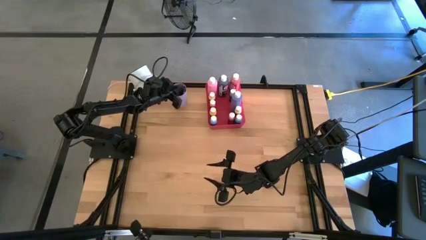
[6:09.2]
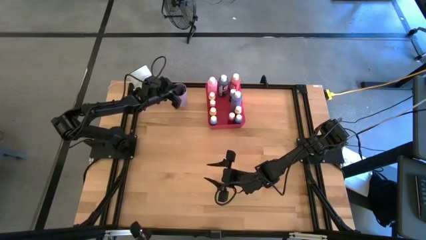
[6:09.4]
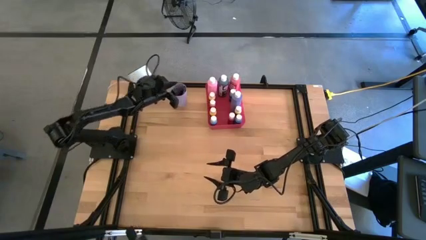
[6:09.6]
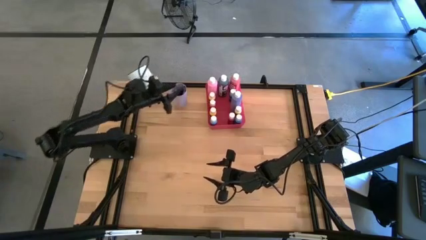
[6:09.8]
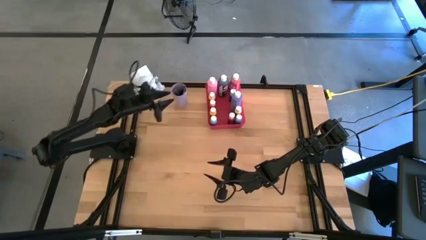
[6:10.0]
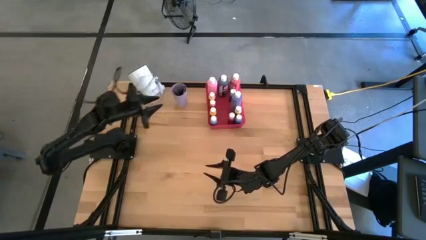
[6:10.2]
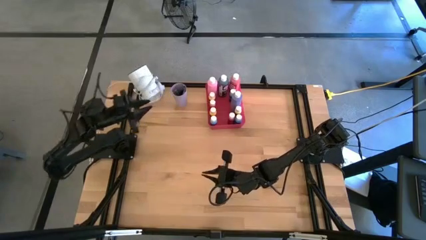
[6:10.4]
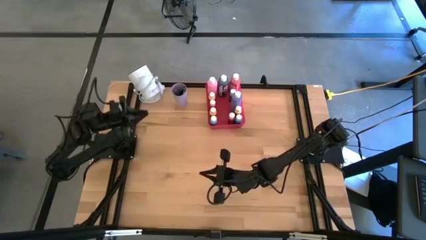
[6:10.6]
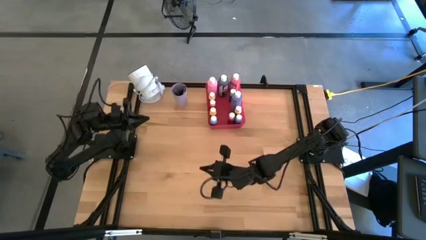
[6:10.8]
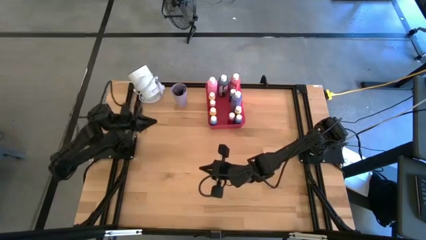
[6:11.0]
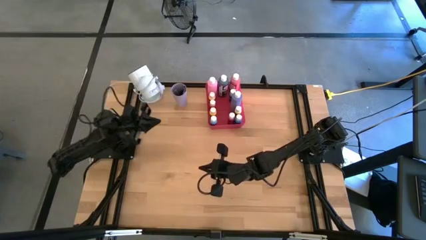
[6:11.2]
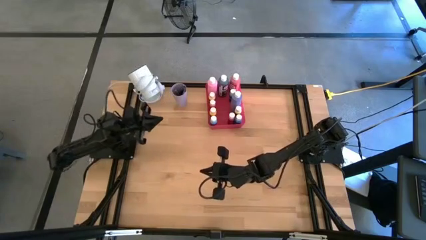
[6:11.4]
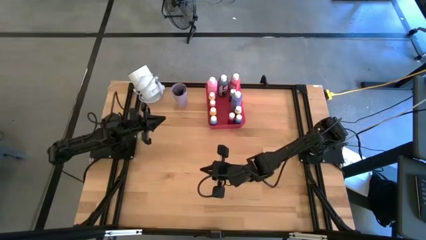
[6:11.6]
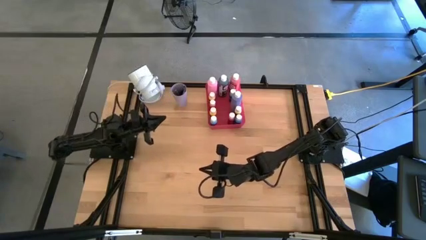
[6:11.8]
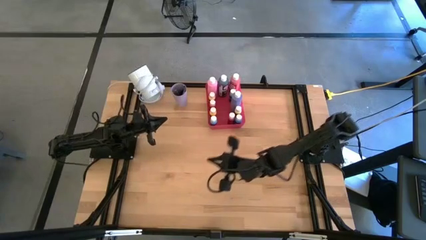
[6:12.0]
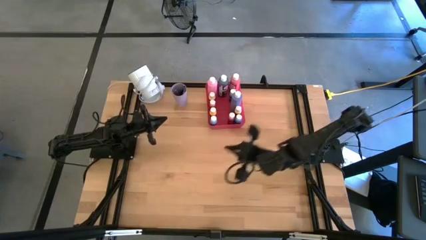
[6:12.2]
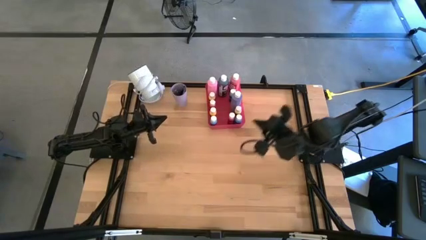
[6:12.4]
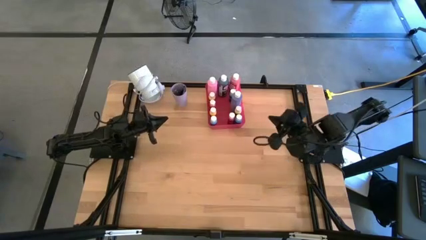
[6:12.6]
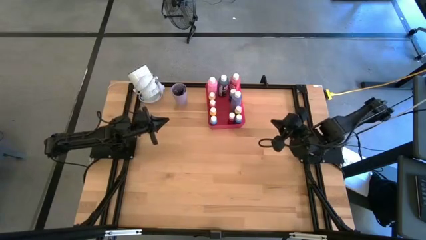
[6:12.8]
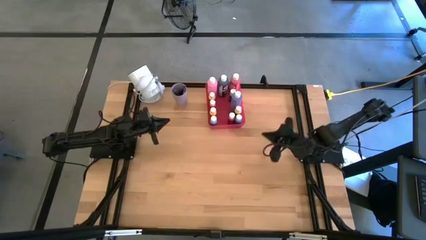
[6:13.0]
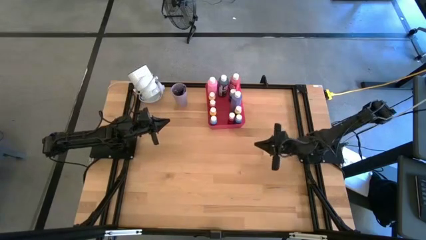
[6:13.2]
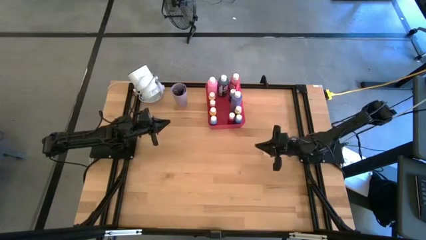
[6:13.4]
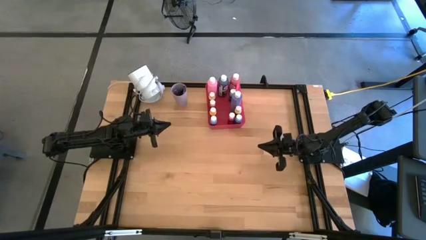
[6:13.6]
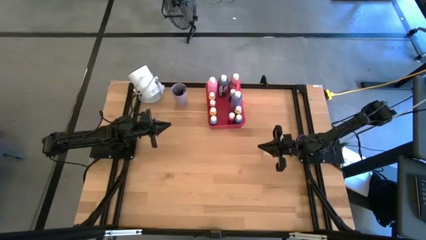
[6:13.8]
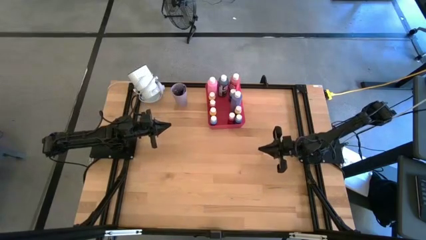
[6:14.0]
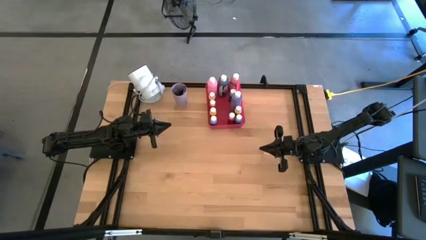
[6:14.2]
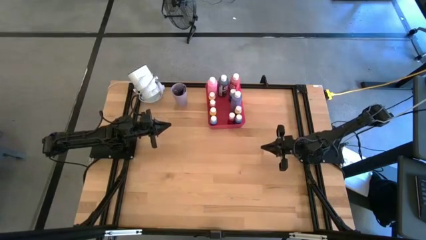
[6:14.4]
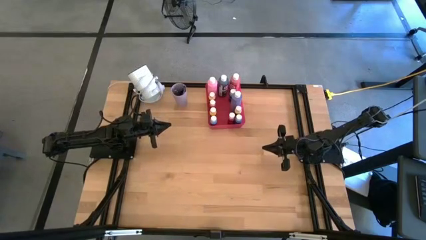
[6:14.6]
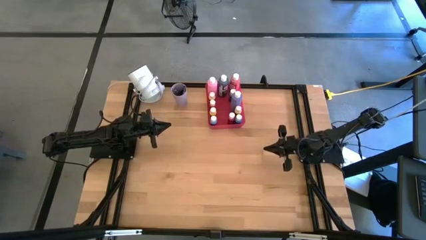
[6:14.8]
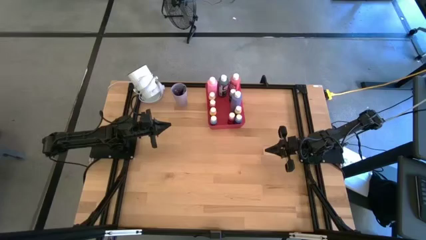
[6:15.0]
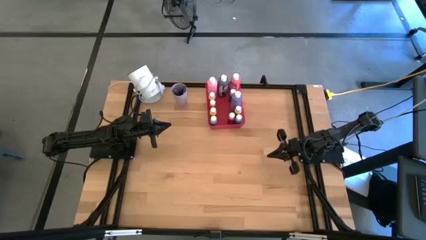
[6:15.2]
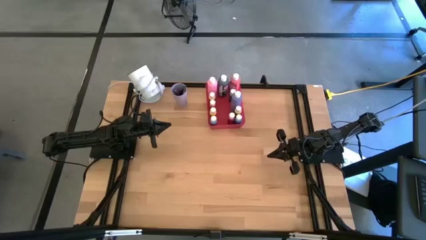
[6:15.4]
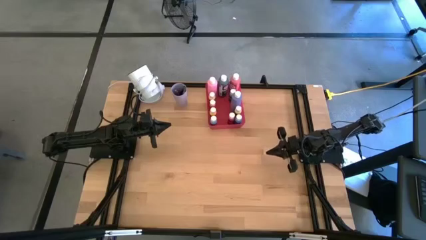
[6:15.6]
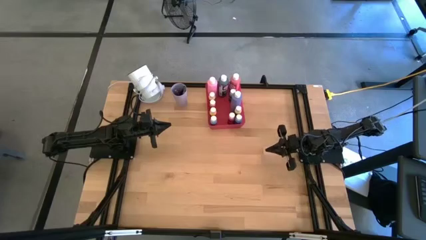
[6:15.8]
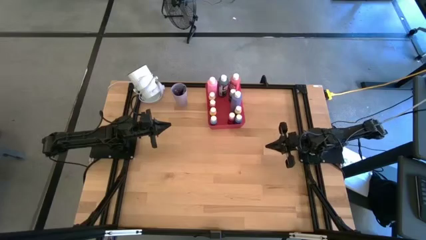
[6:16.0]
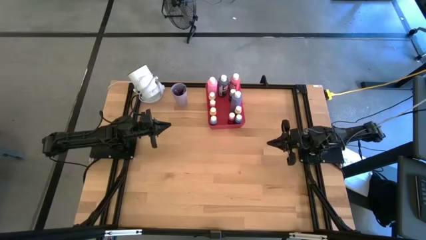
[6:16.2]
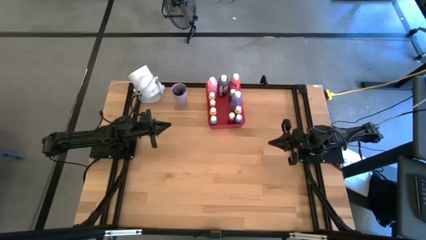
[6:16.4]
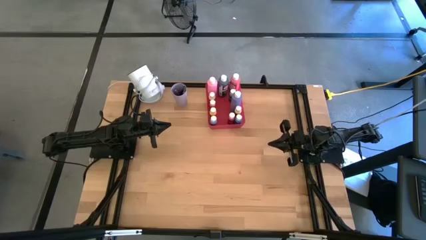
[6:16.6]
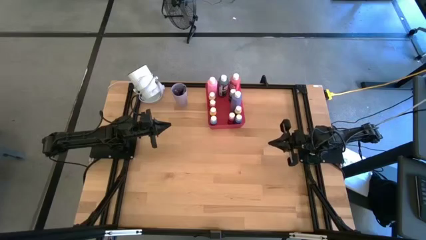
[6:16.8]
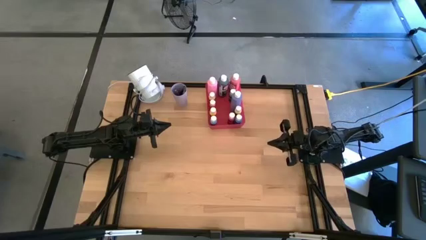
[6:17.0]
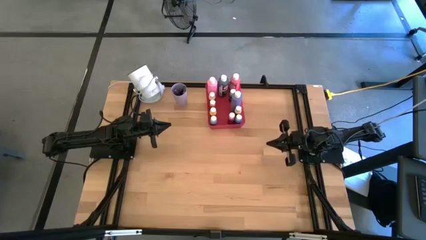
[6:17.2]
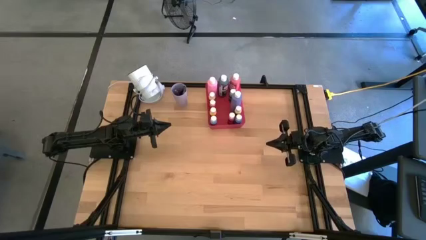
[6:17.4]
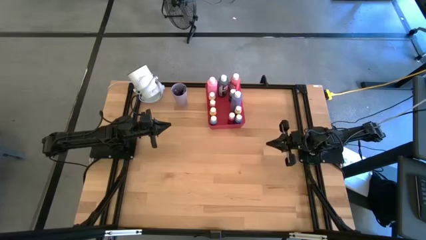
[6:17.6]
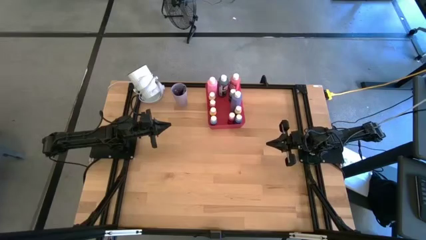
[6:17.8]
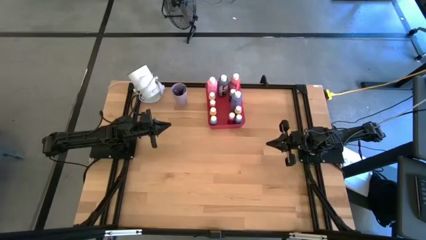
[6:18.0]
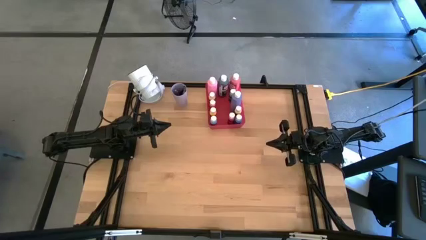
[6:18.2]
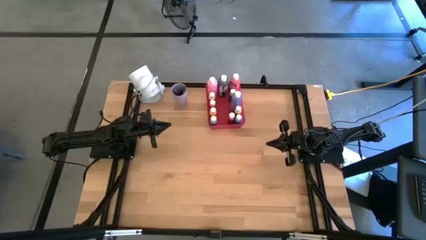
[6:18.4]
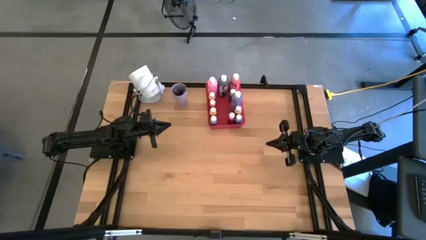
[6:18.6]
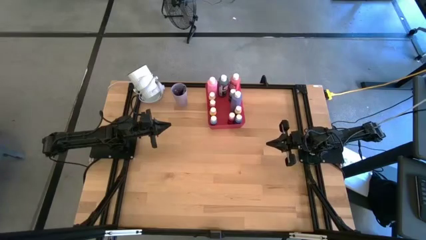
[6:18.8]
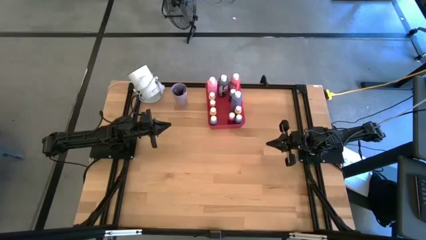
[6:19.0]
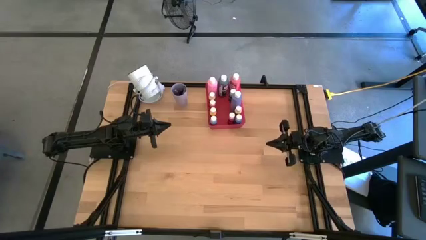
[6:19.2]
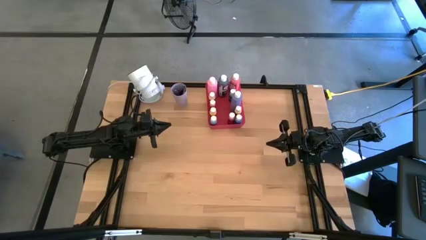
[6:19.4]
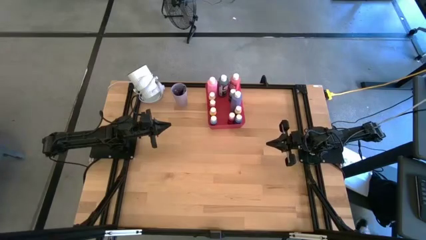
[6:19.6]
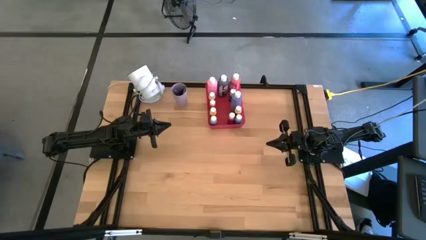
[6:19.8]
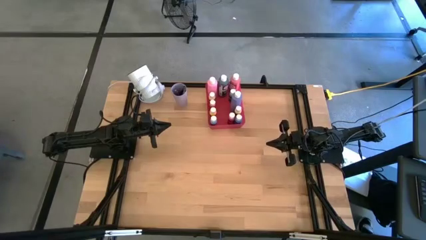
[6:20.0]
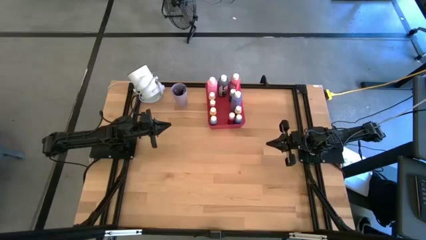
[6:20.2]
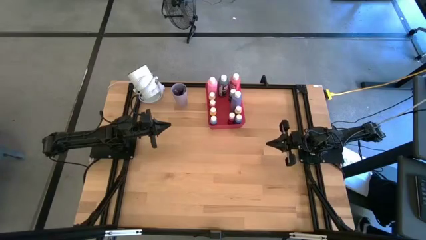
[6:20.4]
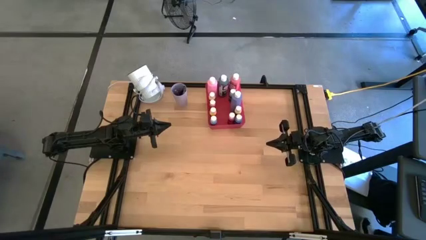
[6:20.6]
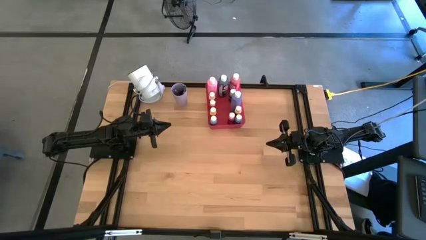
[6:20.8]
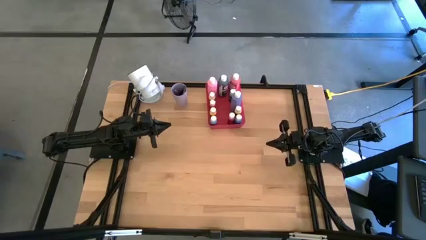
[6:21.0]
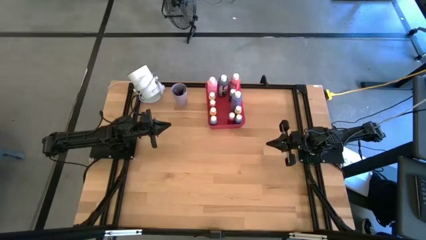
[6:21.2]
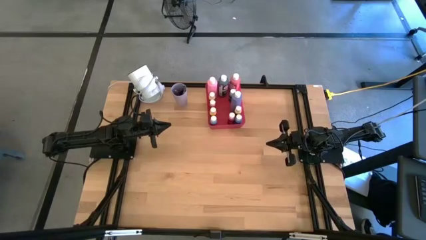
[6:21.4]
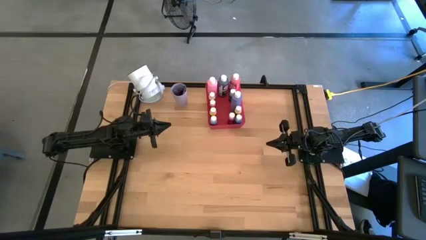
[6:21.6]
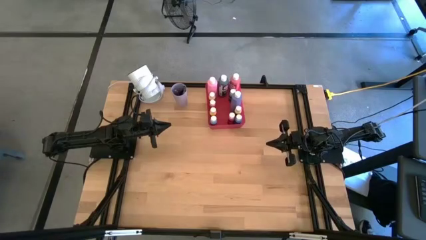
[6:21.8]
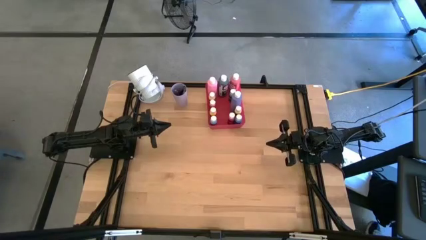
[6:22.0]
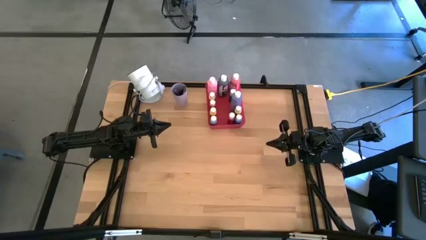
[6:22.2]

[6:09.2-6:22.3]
Task: Pick & Place Paint Supplies
Return to Home Position

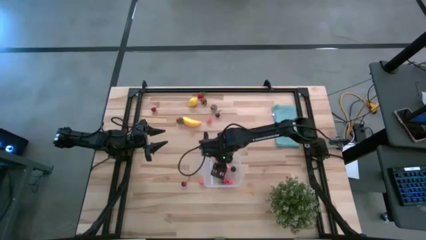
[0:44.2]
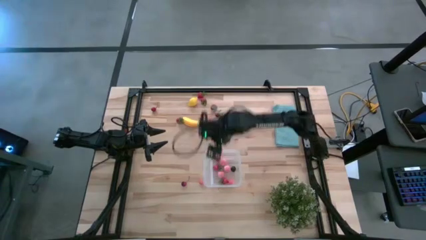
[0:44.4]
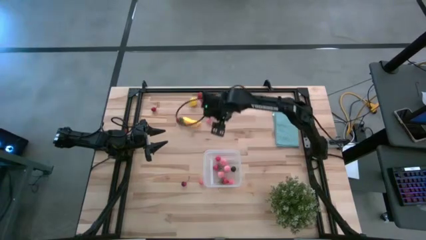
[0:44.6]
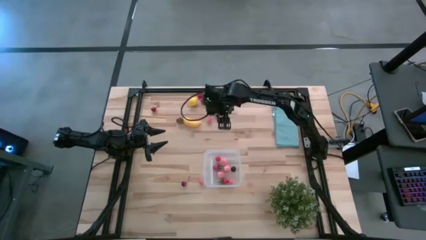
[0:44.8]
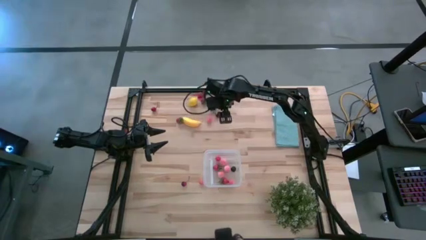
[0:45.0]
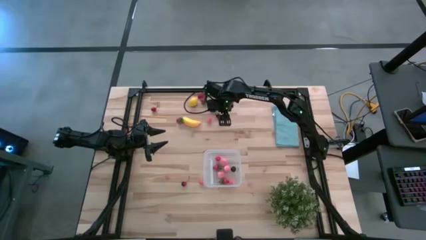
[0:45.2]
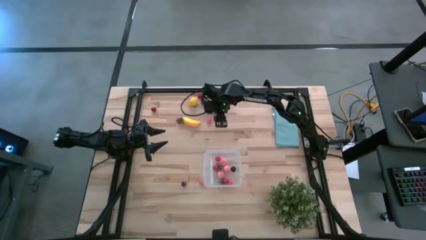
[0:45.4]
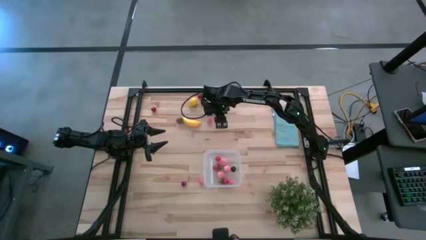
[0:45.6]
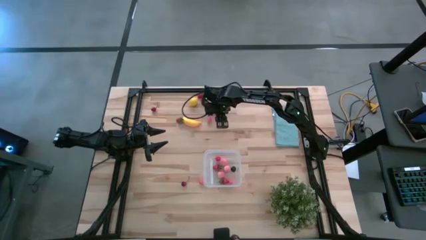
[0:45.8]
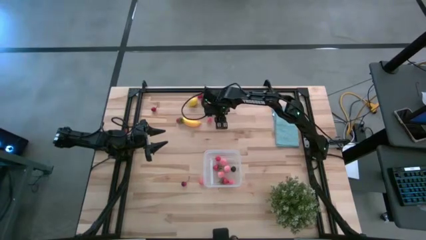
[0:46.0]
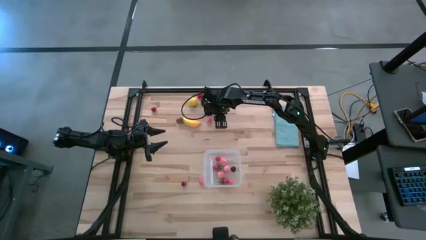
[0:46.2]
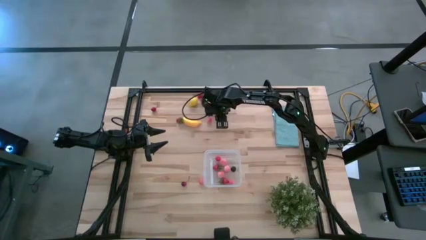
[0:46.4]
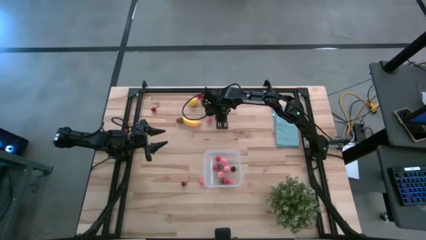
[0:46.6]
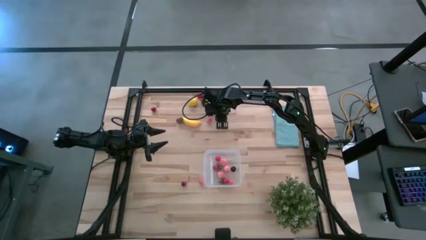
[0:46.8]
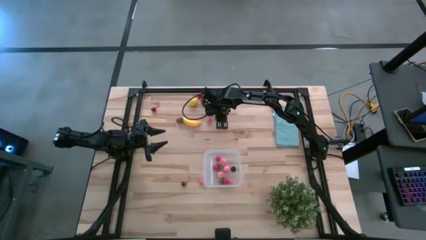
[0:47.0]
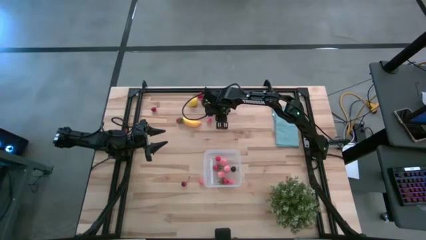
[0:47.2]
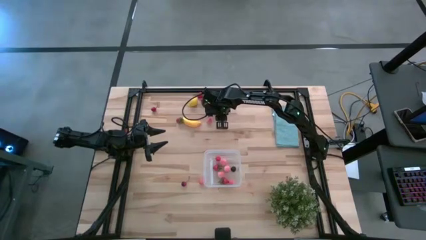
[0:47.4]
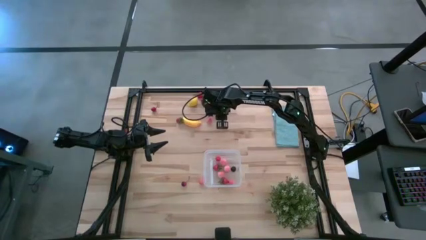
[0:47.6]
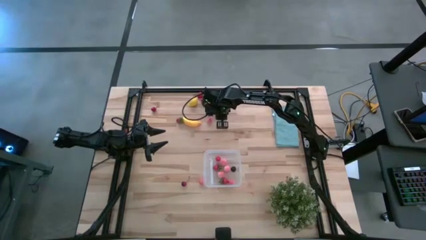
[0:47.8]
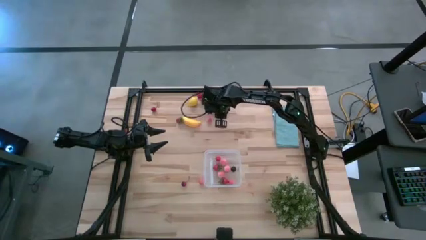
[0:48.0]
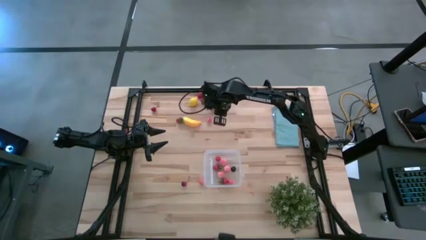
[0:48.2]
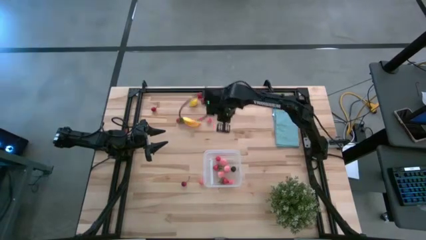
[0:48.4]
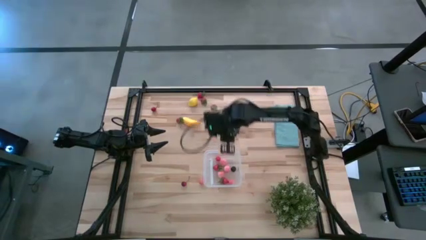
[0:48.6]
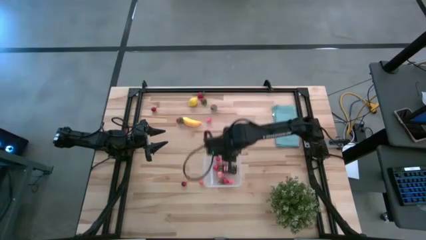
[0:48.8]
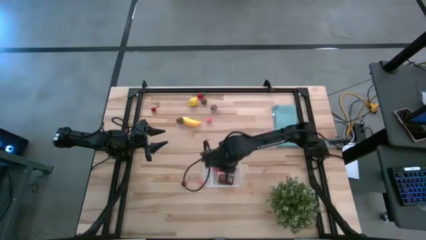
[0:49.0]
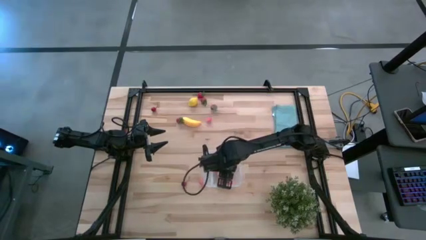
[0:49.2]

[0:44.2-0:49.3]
Task: Pick and placing Produce into tupperware
Put the dark red cherry into the transparent bin
